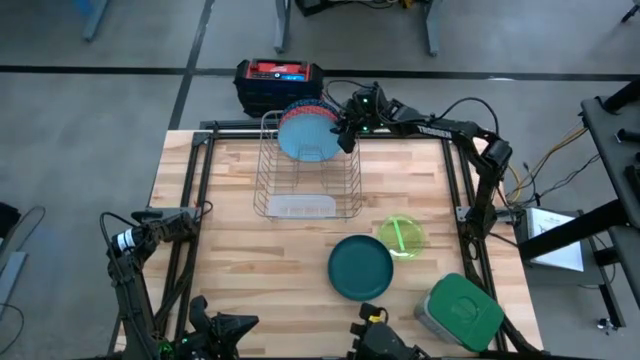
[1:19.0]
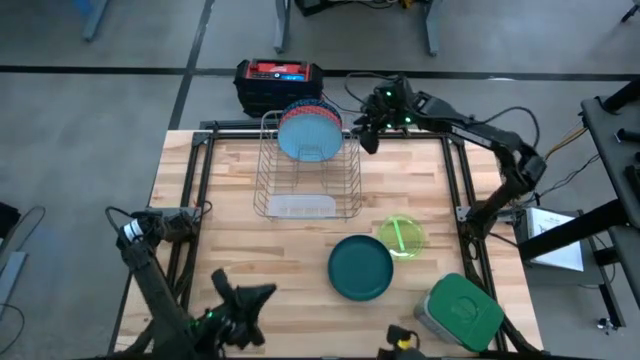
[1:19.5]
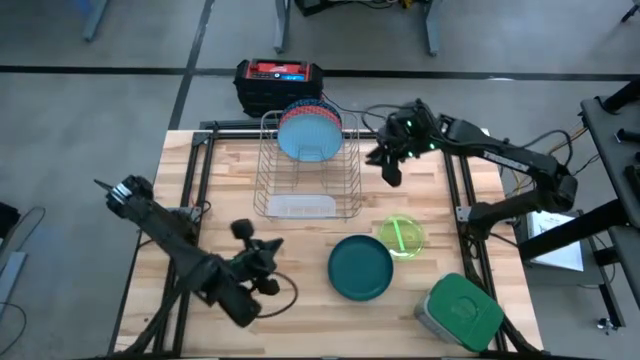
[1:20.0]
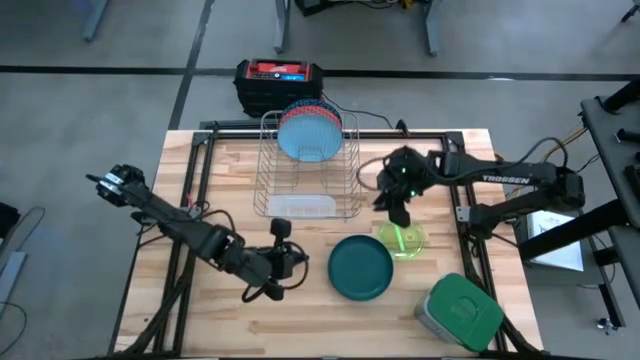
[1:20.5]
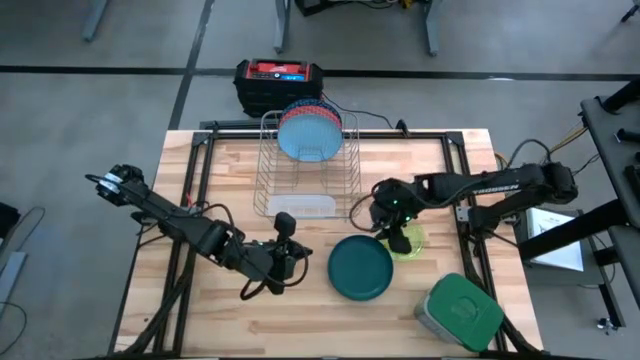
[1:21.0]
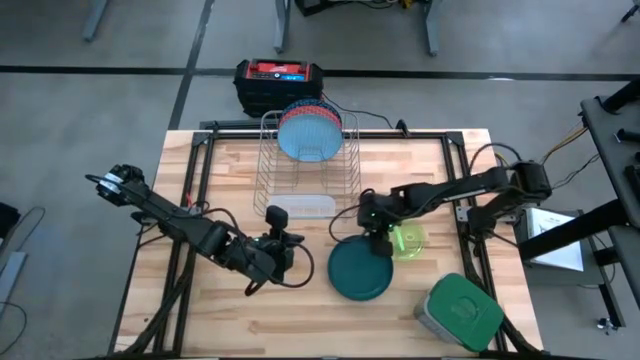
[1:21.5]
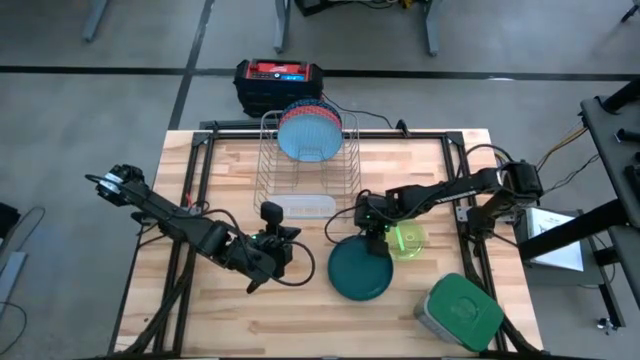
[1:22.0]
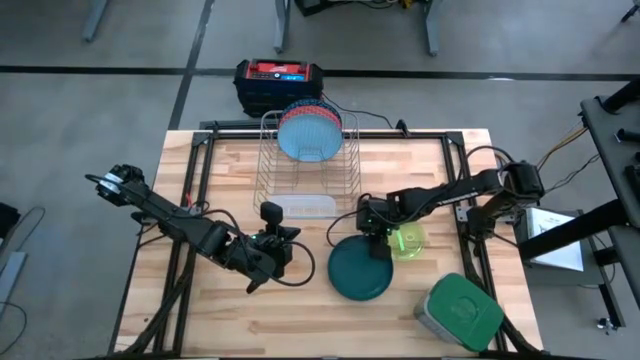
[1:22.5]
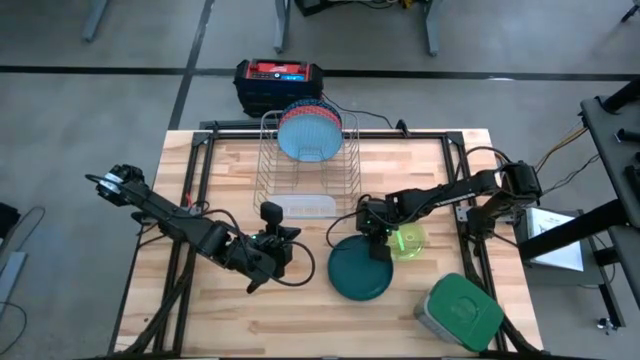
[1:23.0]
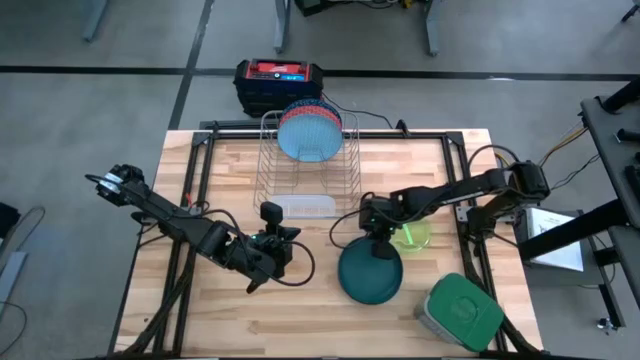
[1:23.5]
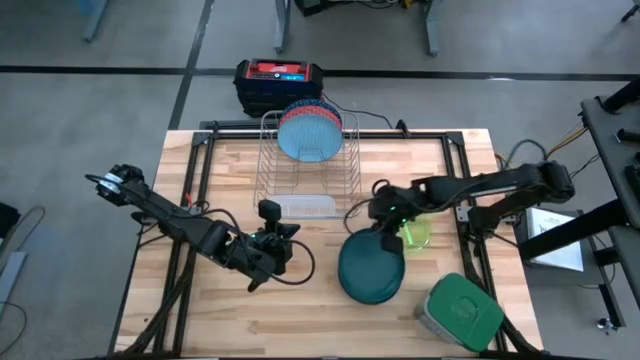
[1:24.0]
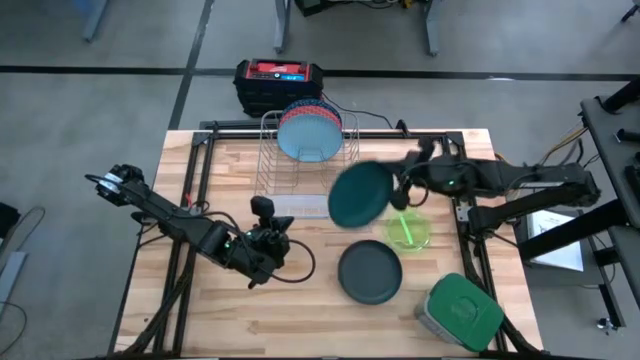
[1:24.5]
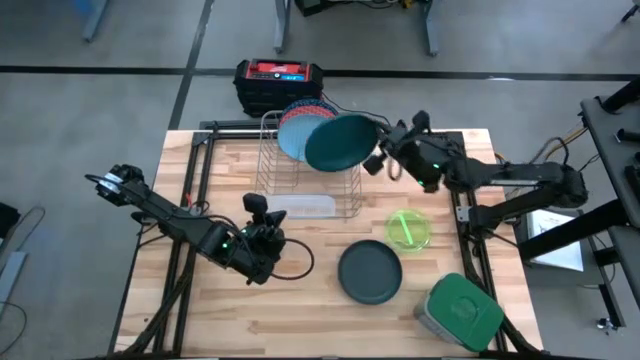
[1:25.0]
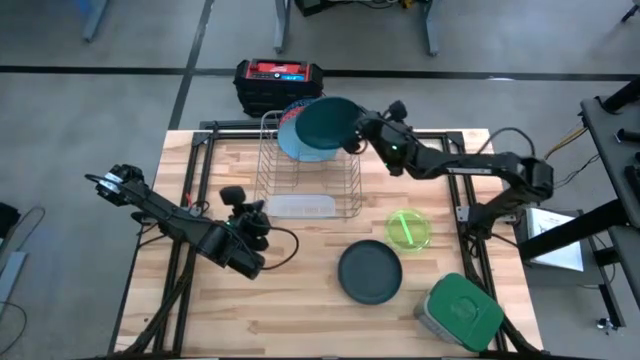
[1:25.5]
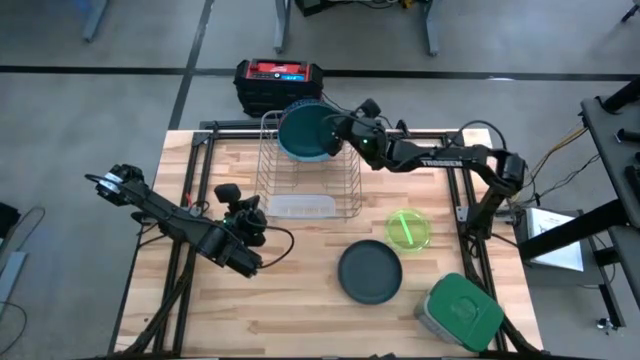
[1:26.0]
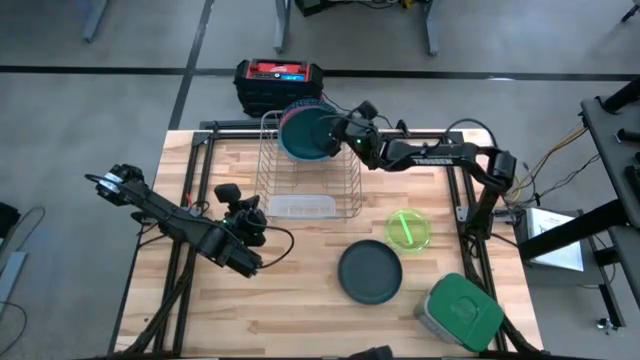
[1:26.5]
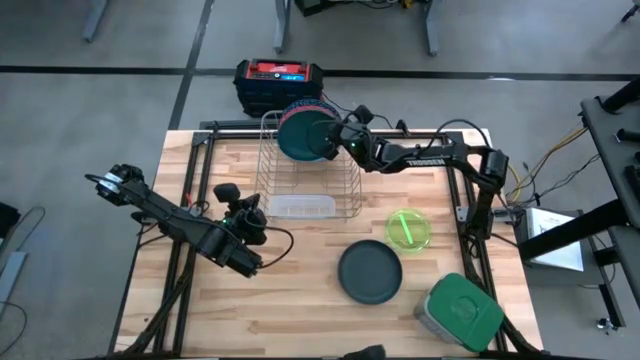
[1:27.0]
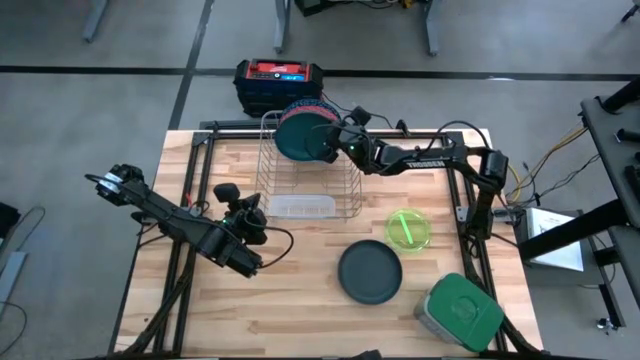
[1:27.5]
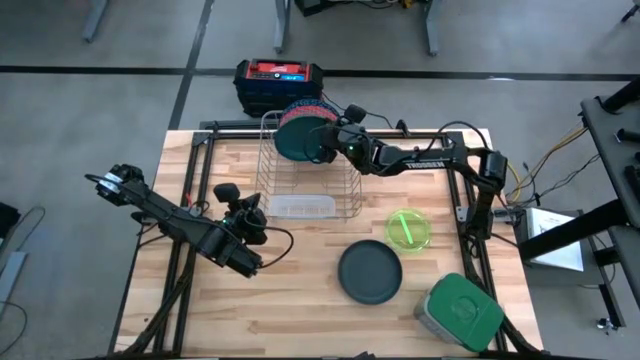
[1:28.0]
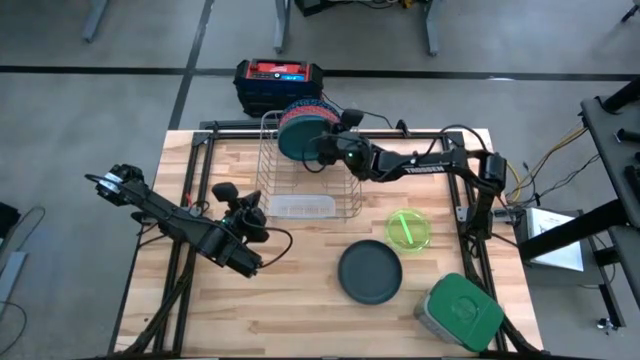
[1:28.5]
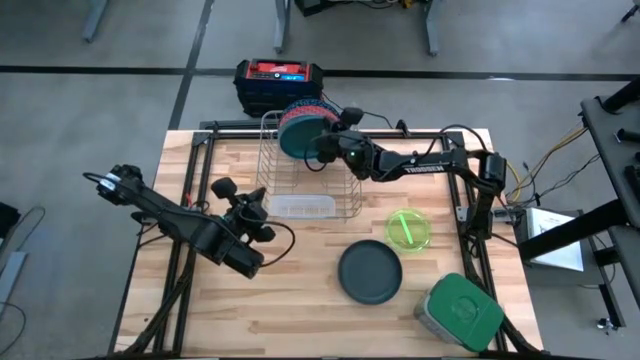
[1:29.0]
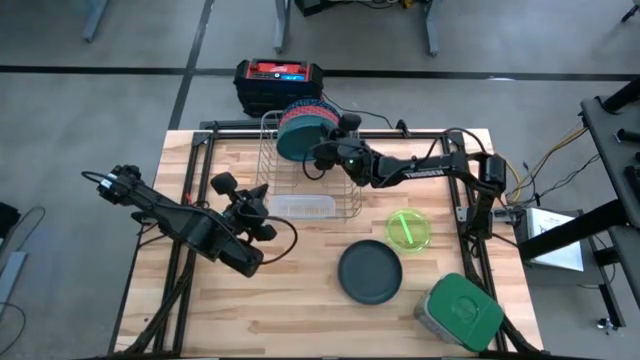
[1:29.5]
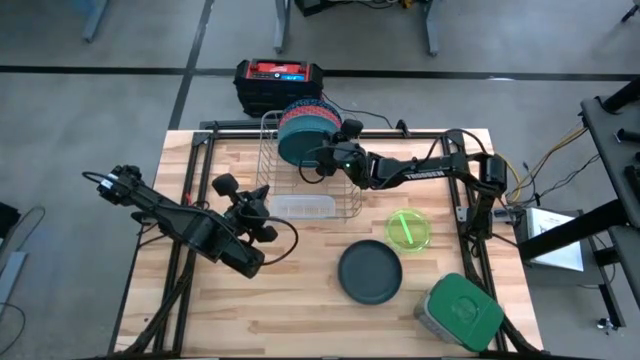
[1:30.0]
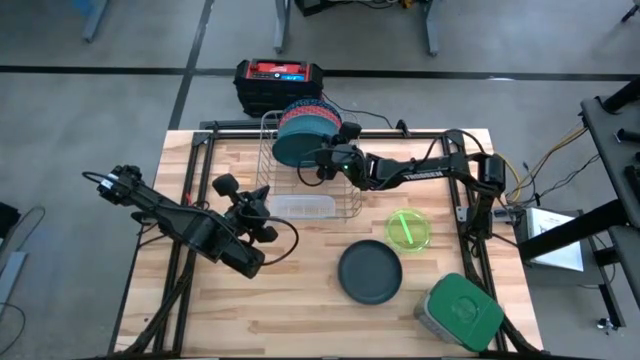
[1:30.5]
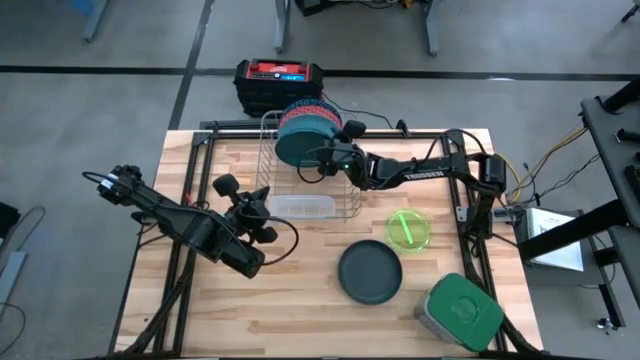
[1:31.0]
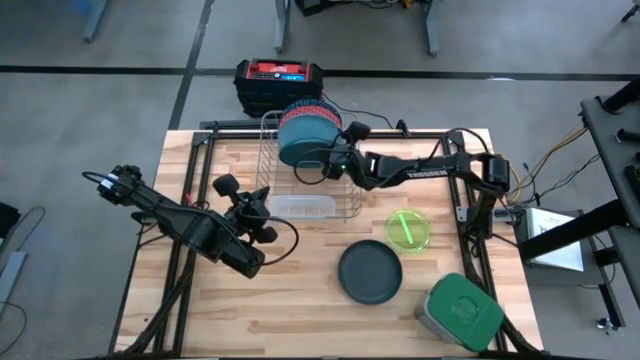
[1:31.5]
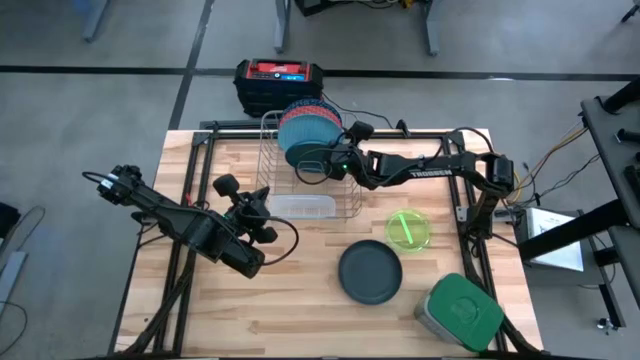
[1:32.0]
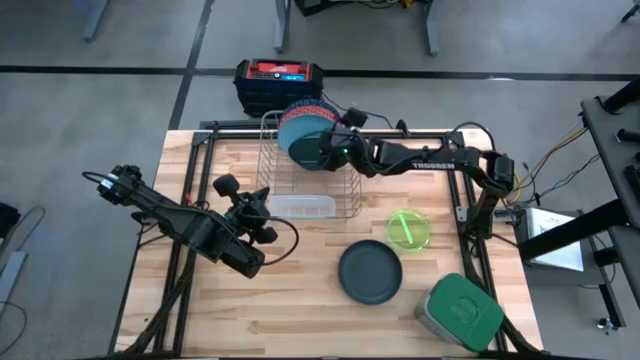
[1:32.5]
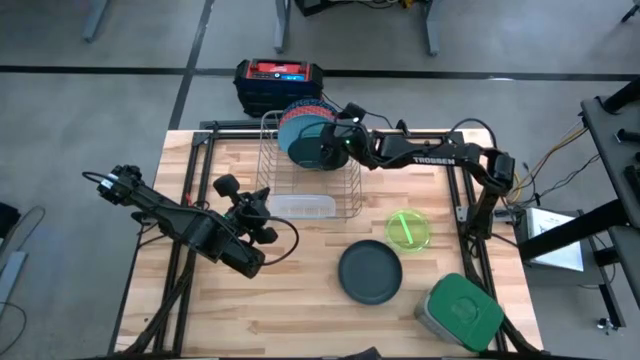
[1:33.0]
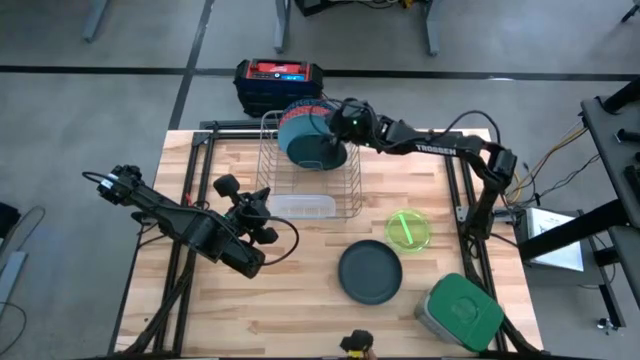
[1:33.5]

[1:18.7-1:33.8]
Task: Sort dishes
Put the dark green plate into the dish rack

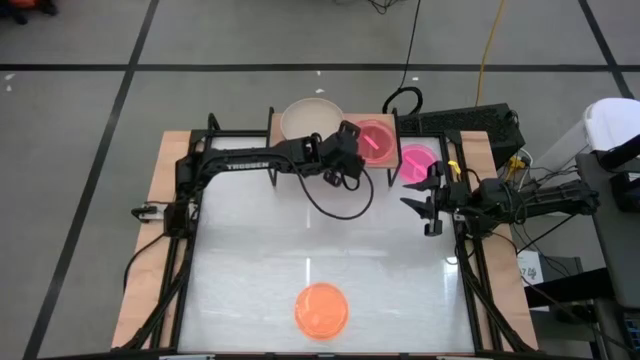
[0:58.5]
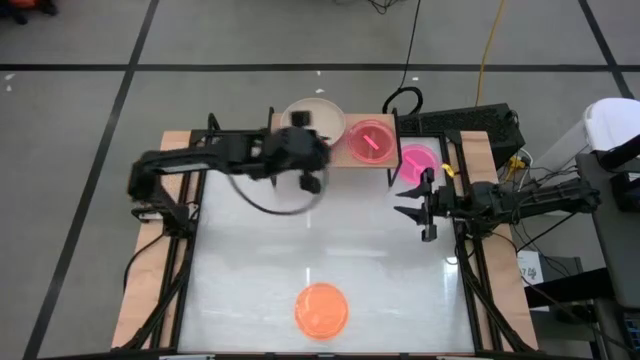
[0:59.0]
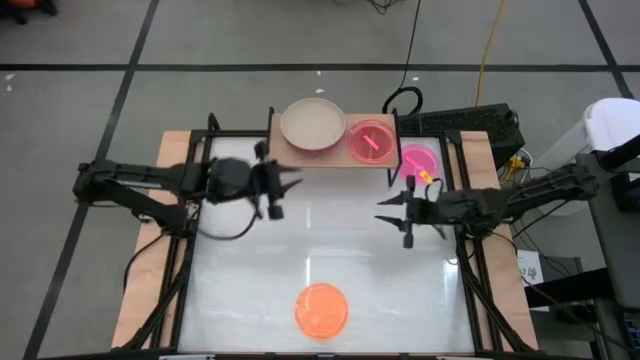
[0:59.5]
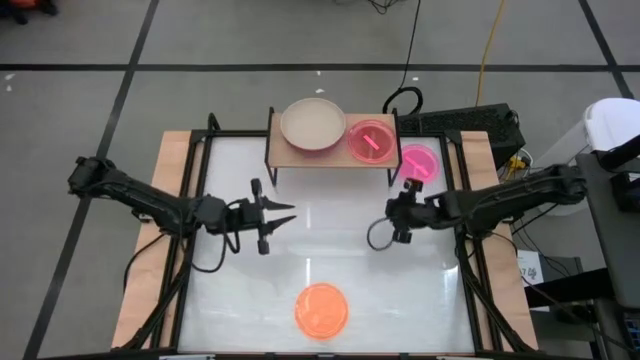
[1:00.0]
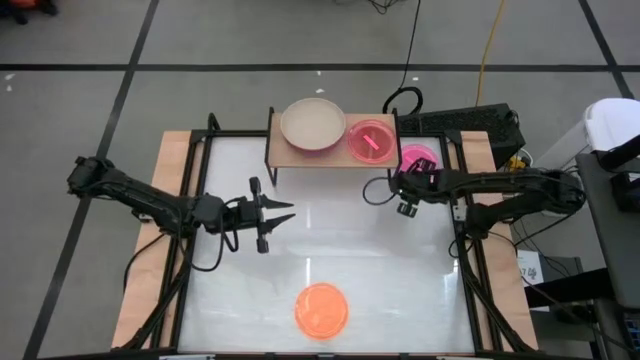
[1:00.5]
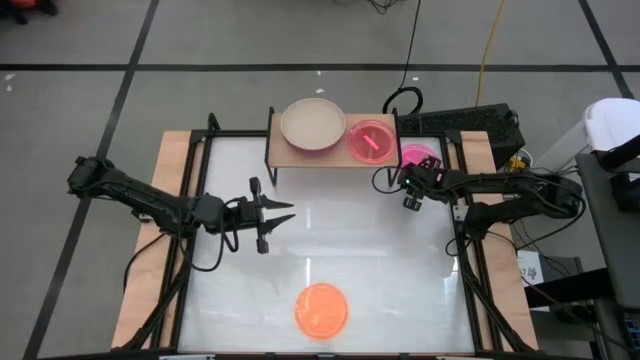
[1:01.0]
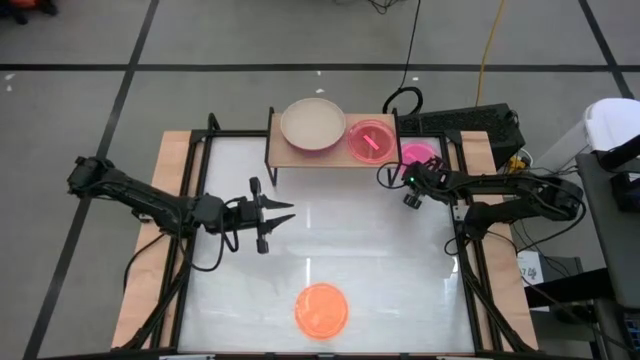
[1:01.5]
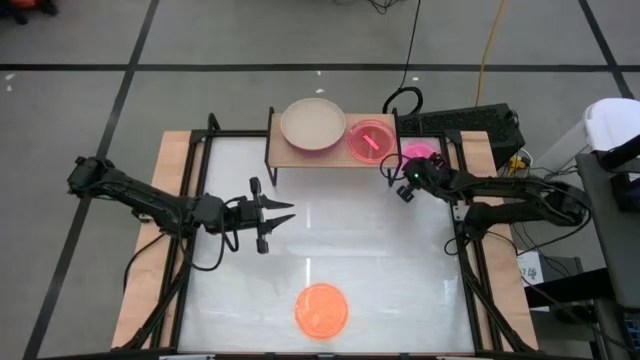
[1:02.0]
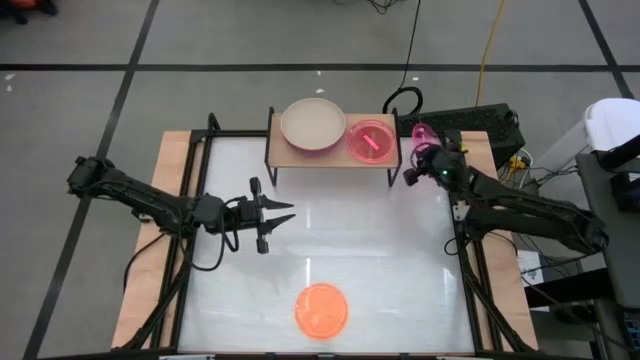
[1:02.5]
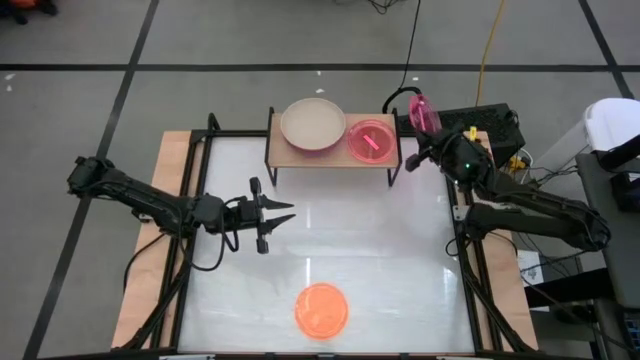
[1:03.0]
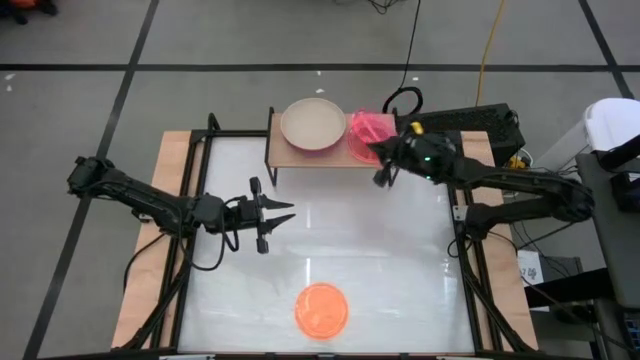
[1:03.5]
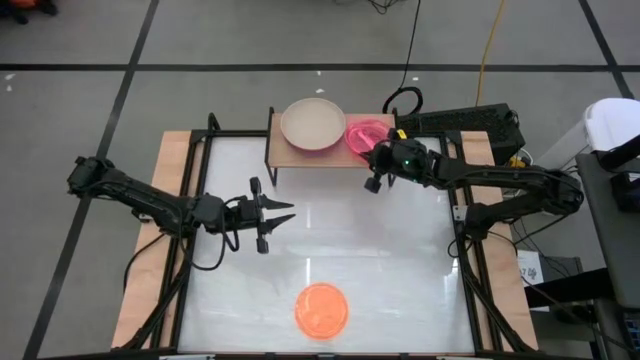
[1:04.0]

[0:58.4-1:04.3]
Task: Place and stack plates onto a shelf
Stack the light pink plate on top of the light pink plate on the shelf
